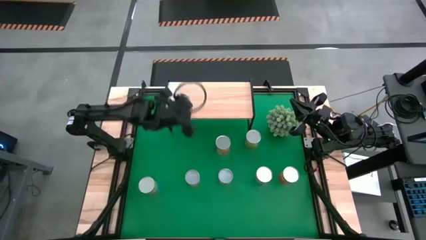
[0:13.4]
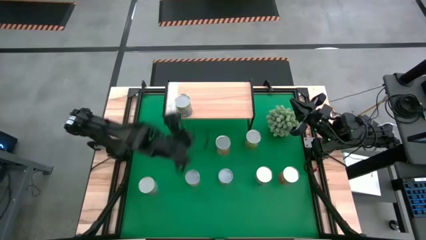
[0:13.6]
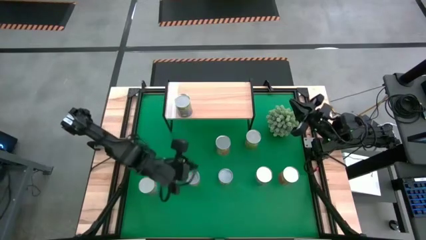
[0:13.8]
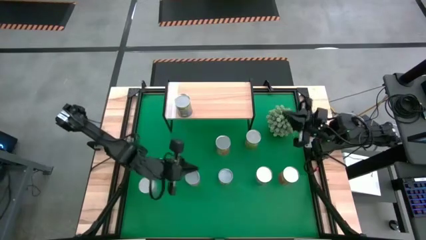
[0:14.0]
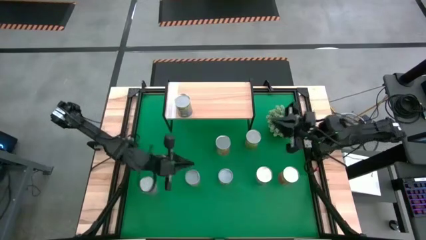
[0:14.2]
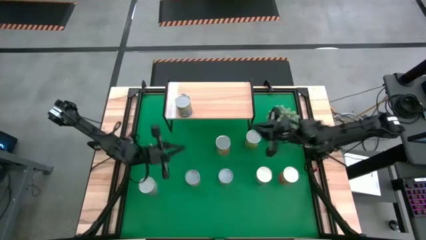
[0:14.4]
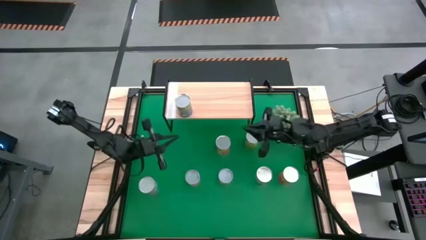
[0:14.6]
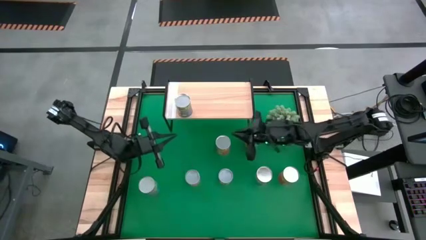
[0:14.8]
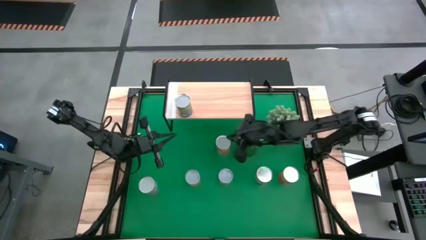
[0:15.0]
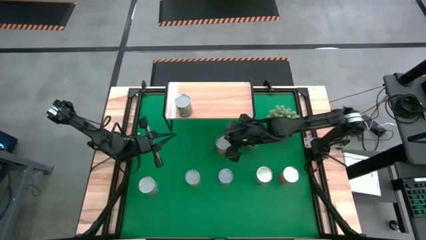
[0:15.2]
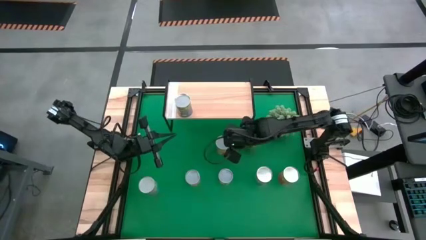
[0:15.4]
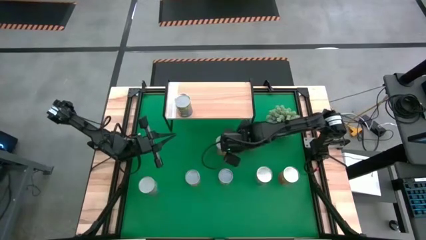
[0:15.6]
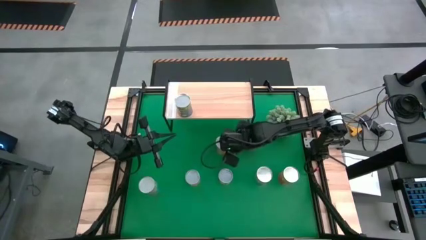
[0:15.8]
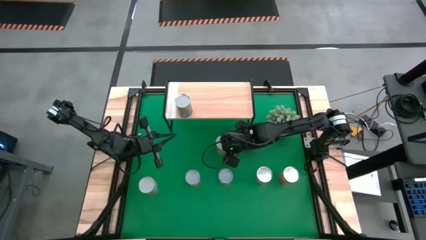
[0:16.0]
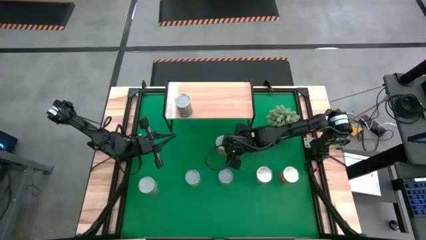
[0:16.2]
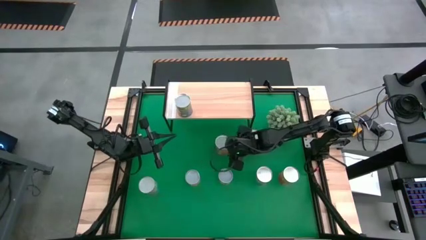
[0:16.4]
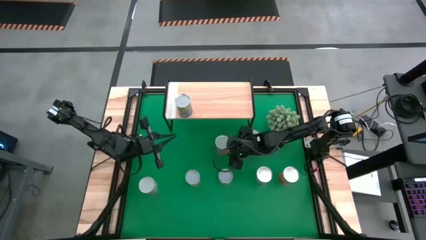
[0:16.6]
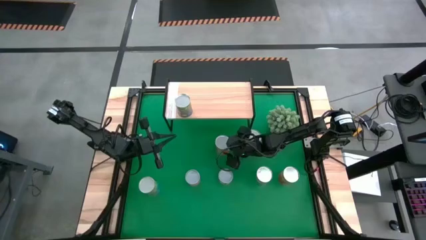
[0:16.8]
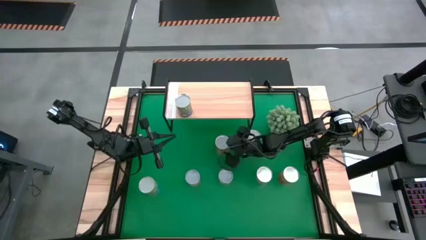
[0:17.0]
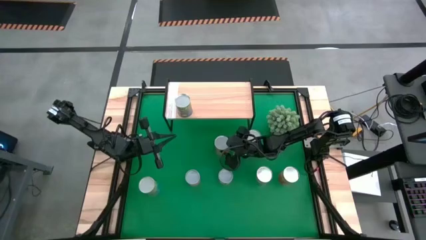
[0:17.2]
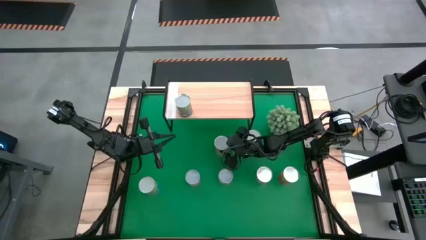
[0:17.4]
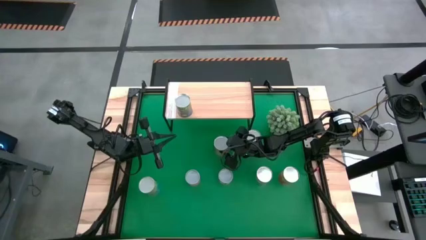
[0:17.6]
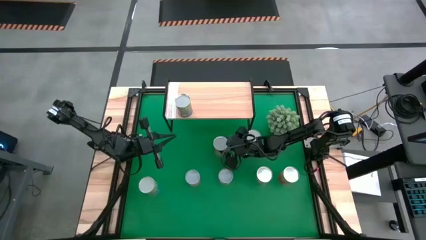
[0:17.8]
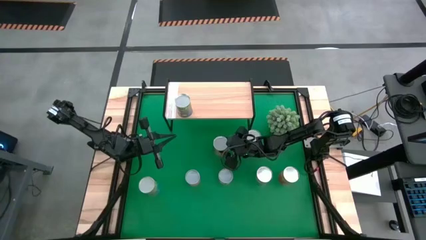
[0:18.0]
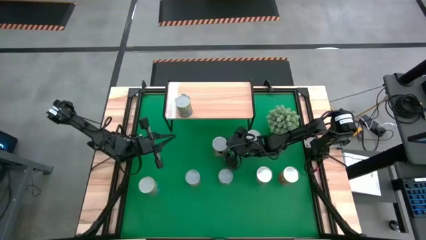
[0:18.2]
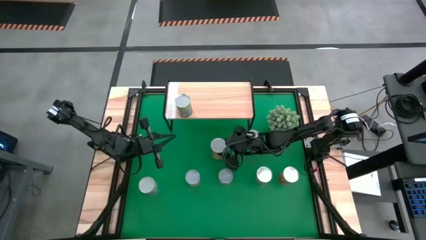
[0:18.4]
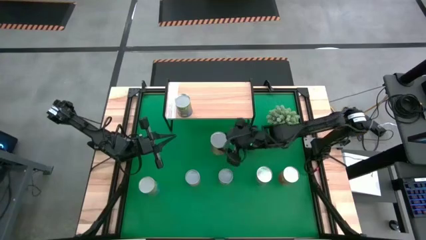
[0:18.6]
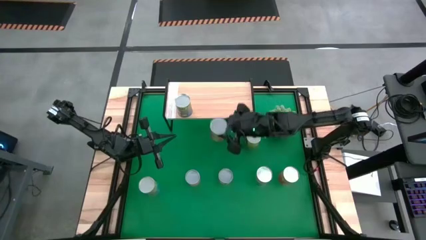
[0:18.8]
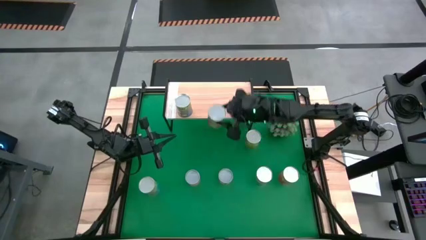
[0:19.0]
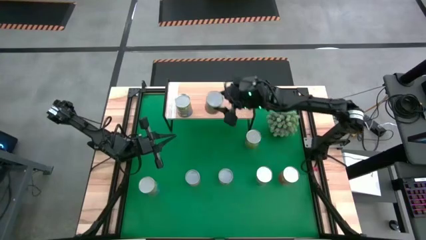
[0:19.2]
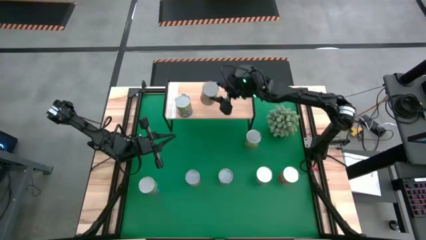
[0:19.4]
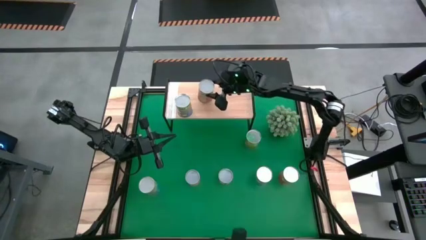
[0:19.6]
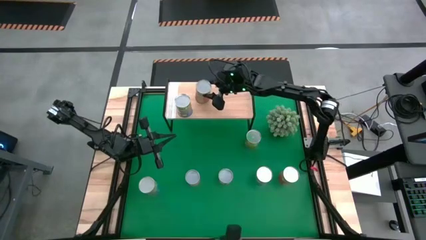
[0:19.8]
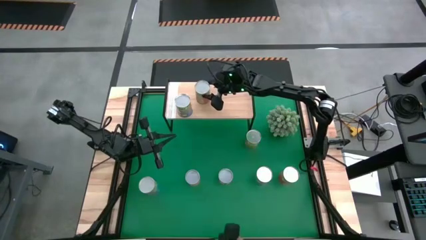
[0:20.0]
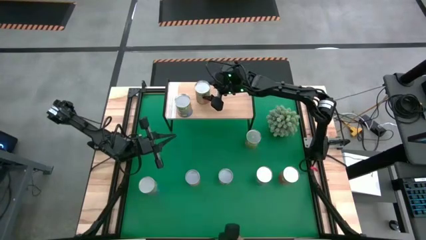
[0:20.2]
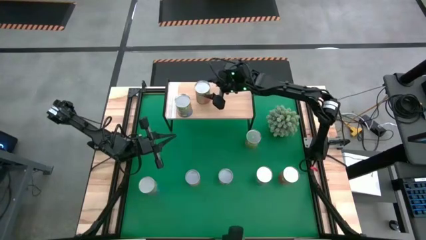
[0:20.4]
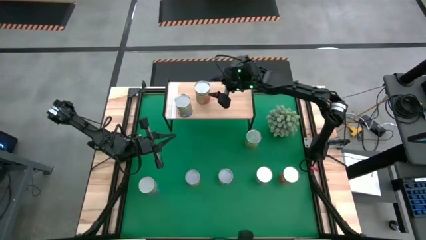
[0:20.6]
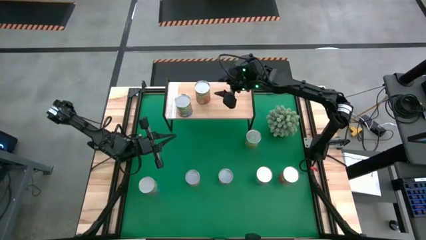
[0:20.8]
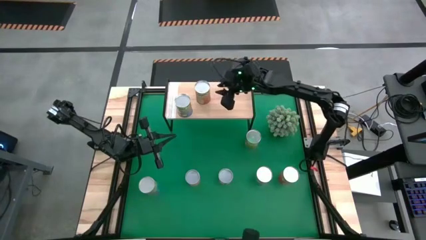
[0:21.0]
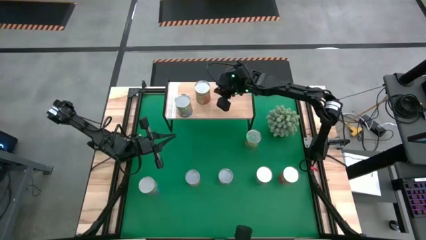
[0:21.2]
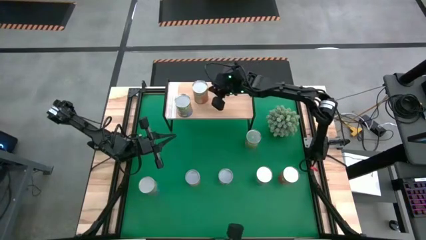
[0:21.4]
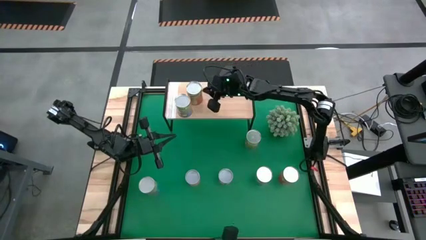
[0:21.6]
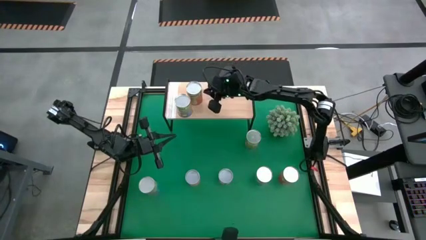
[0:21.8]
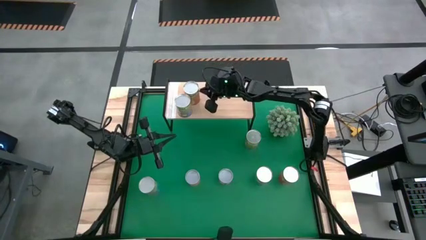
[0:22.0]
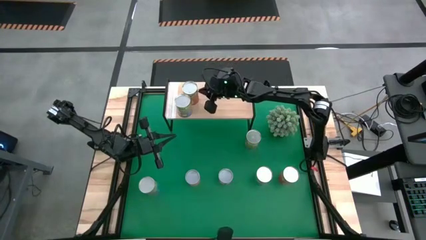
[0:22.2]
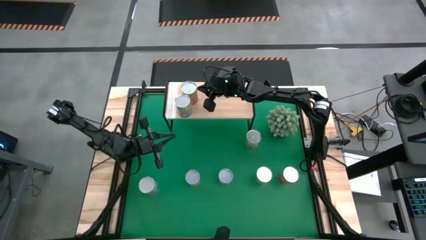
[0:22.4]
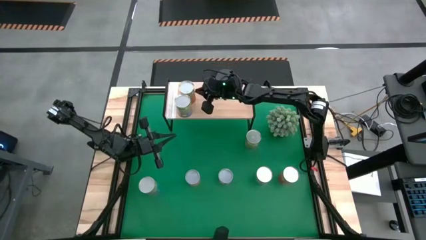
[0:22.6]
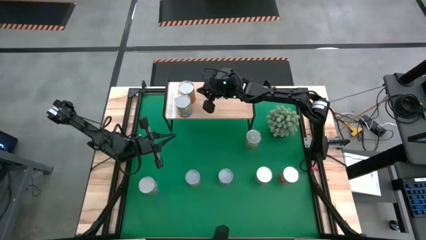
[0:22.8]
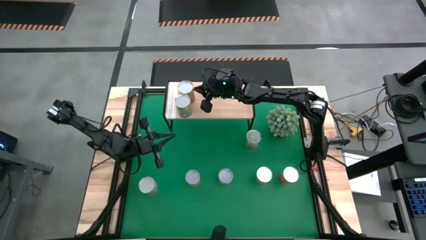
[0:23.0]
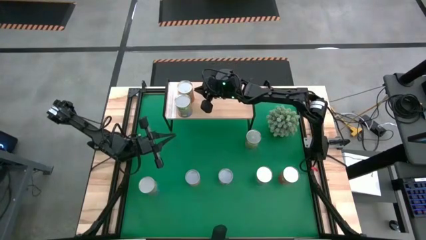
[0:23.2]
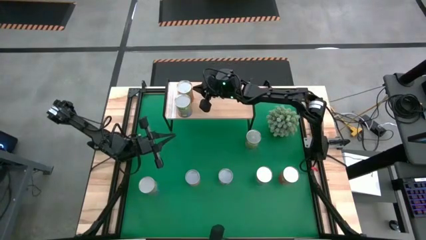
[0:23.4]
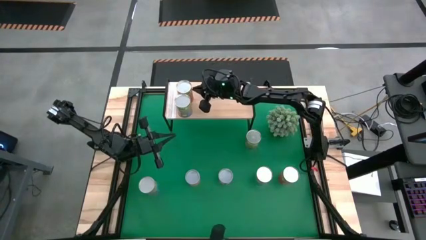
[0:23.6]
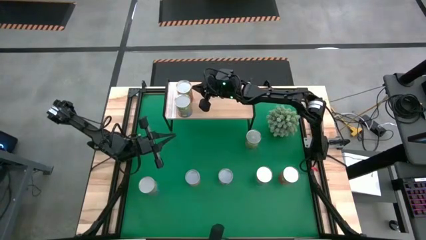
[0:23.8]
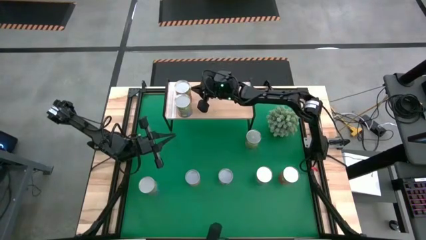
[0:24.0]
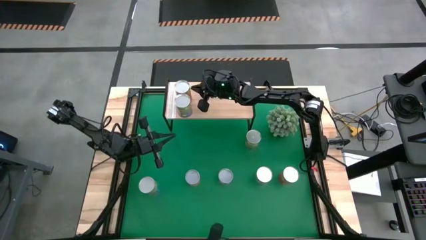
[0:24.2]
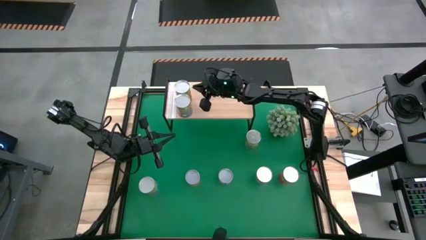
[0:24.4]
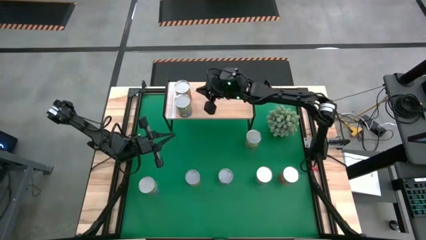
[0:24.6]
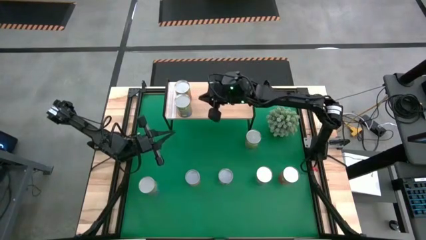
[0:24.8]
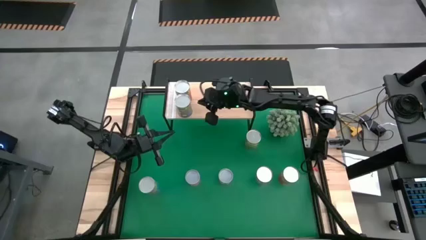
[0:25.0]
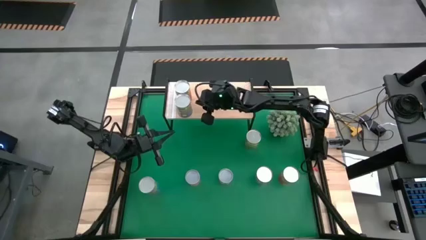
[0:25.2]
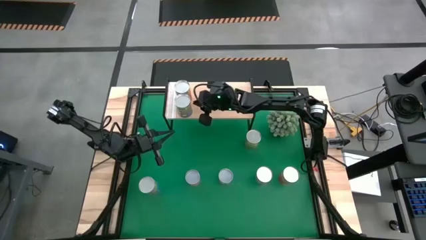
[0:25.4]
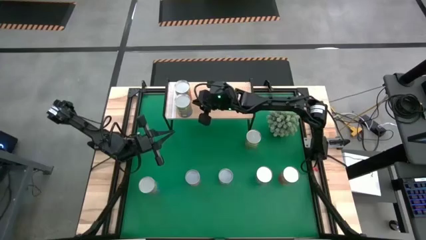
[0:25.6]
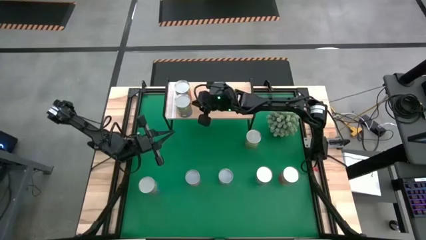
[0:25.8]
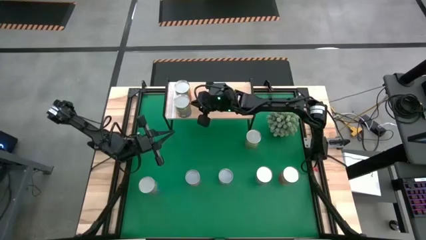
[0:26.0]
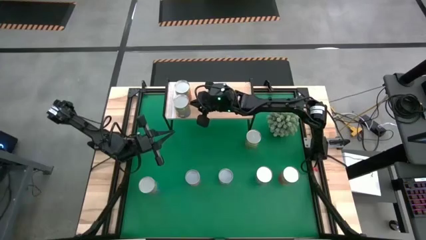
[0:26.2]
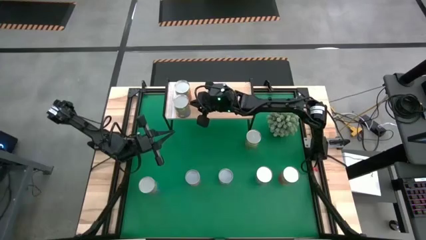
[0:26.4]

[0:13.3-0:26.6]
Task: Pick and place cans onto a shelf
Put the left canned pineapple on the shelf

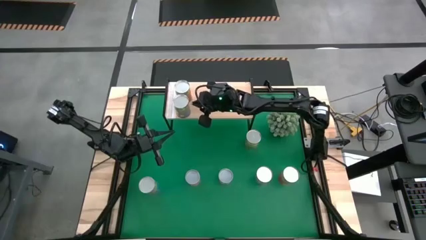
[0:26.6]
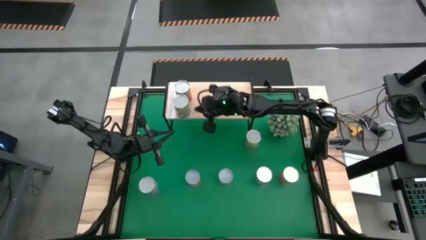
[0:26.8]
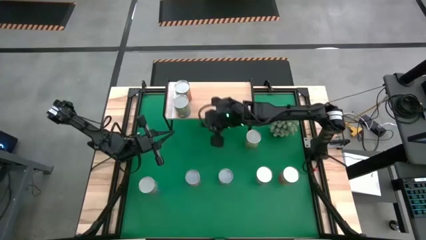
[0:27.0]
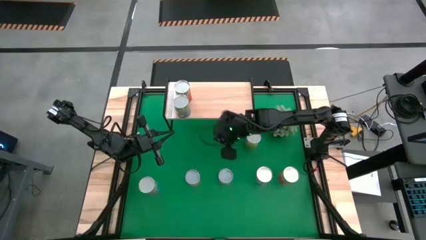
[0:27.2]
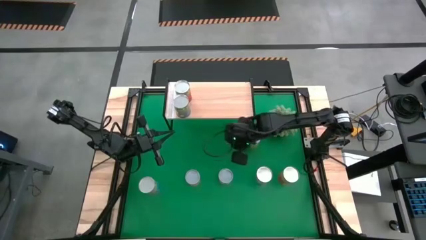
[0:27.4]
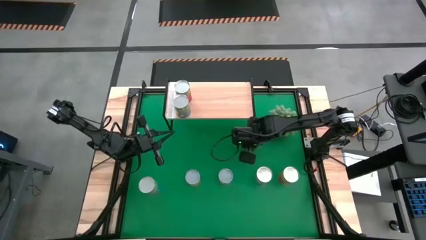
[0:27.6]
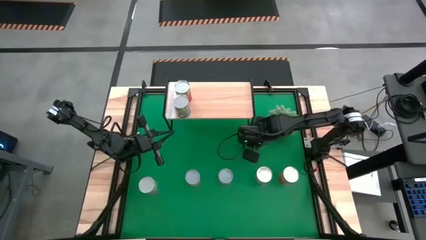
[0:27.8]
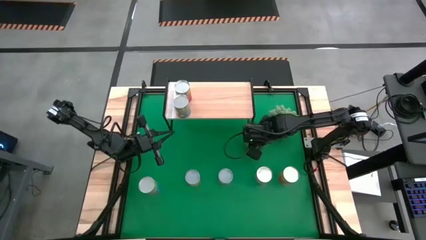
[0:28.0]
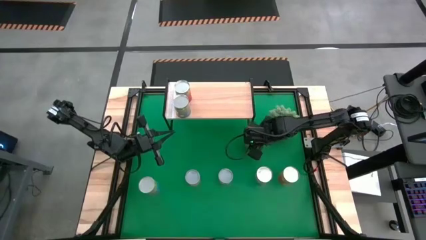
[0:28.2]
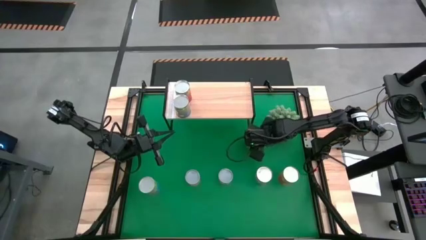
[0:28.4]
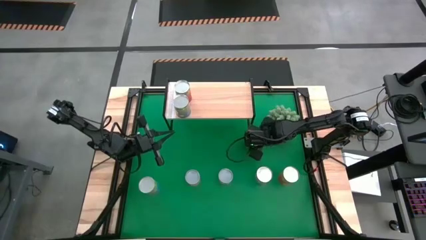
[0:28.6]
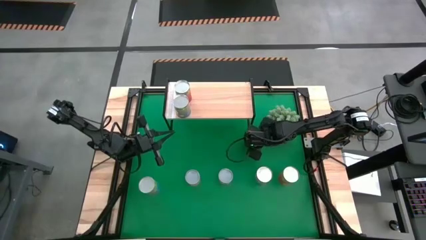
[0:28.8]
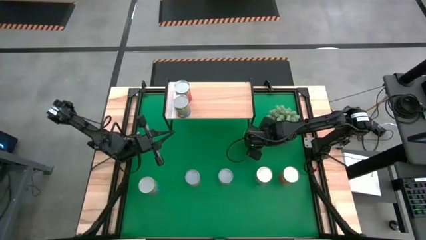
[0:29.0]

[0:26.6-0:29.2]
Put the canned oranges on the shelf
